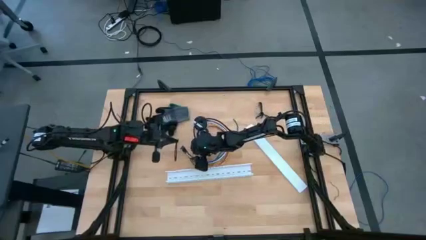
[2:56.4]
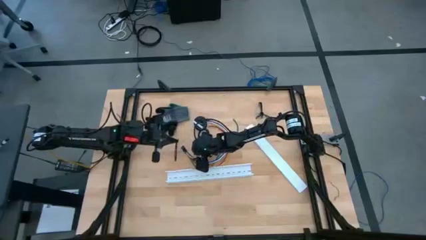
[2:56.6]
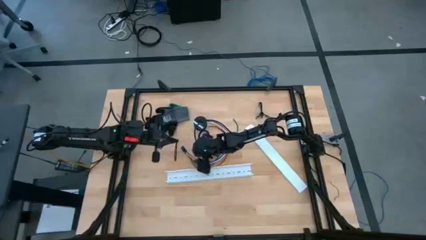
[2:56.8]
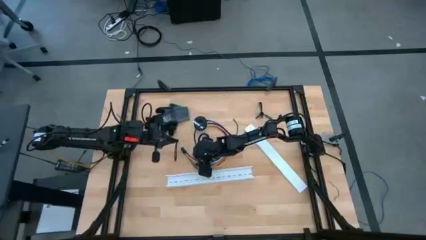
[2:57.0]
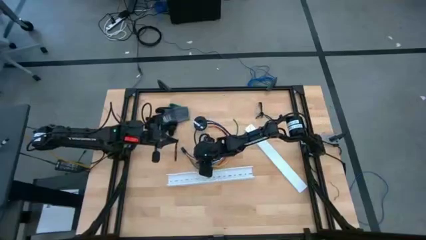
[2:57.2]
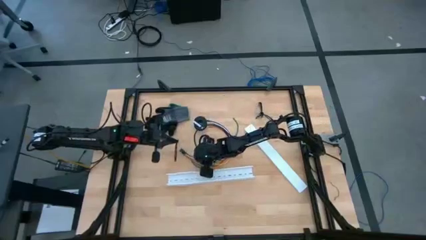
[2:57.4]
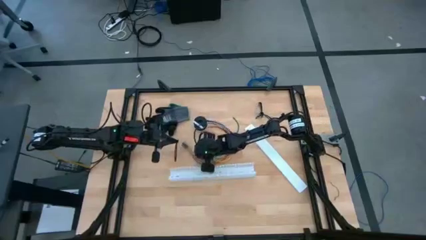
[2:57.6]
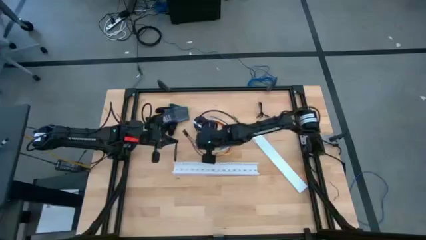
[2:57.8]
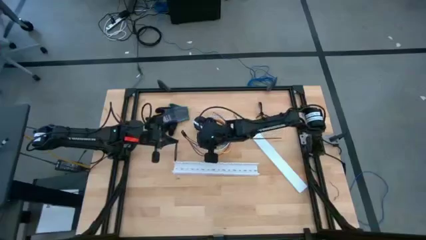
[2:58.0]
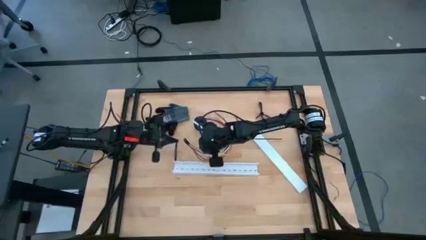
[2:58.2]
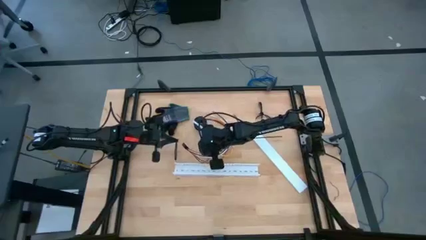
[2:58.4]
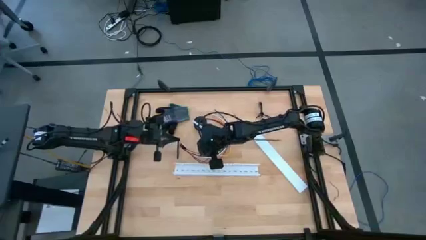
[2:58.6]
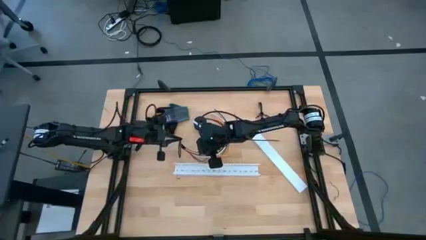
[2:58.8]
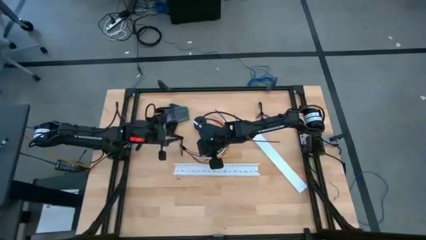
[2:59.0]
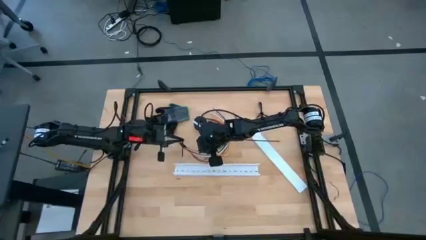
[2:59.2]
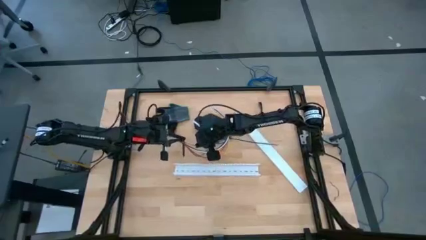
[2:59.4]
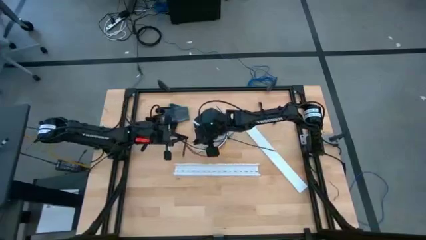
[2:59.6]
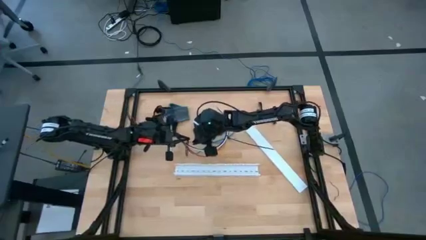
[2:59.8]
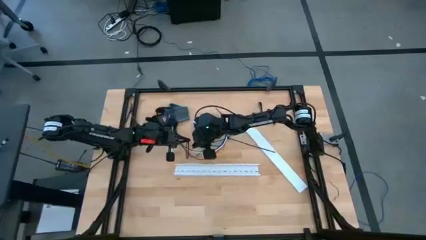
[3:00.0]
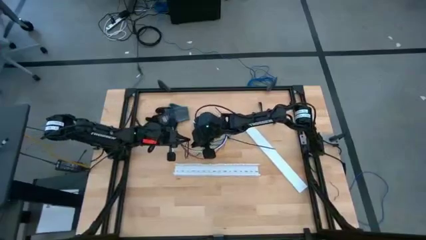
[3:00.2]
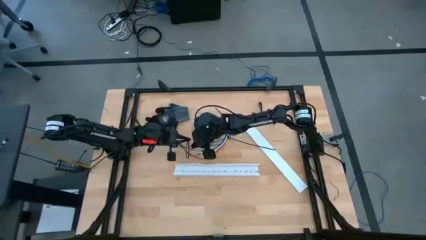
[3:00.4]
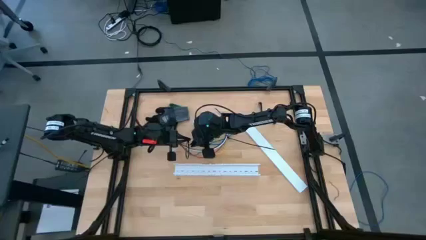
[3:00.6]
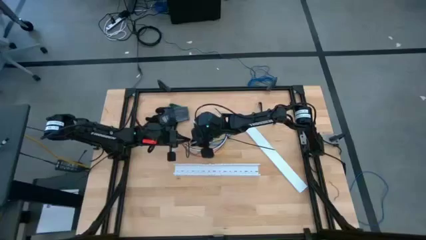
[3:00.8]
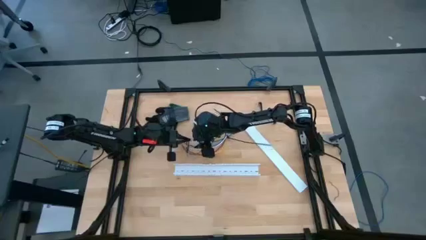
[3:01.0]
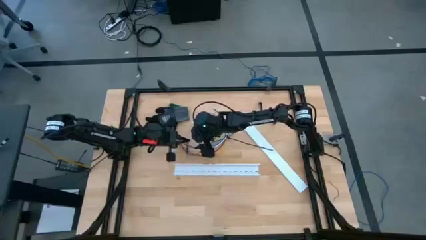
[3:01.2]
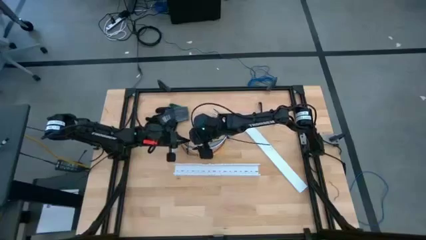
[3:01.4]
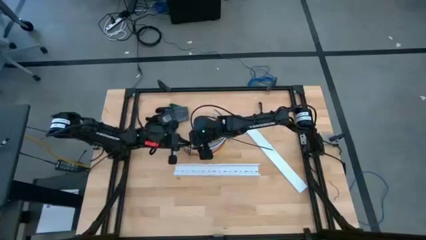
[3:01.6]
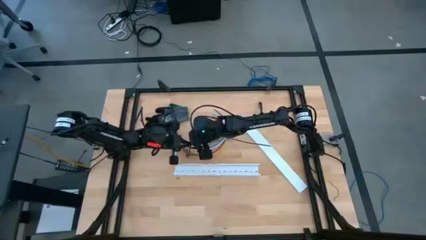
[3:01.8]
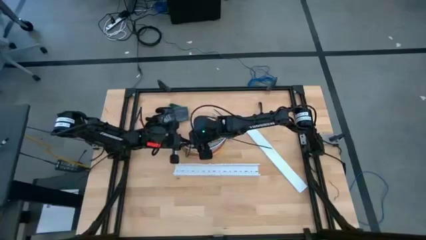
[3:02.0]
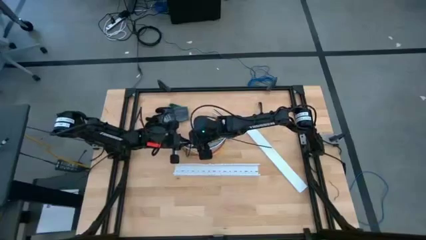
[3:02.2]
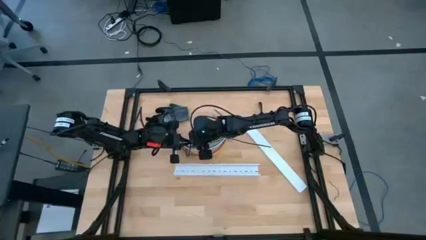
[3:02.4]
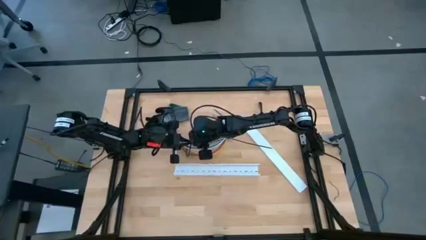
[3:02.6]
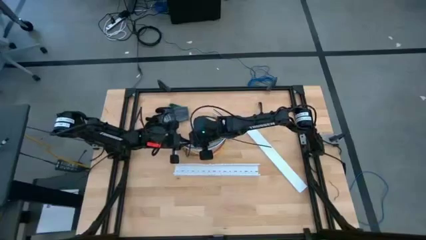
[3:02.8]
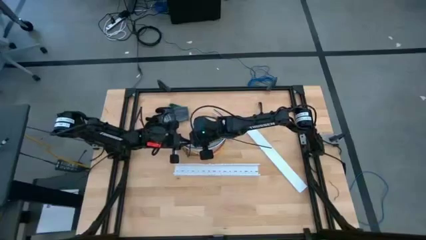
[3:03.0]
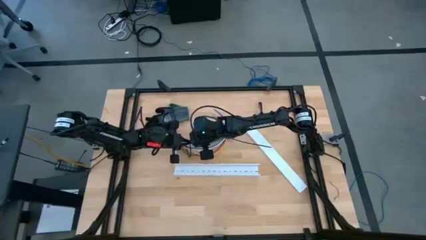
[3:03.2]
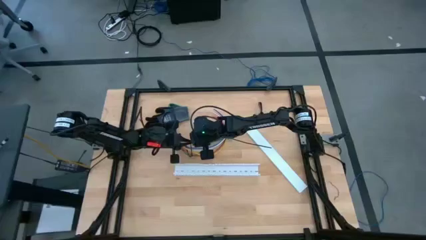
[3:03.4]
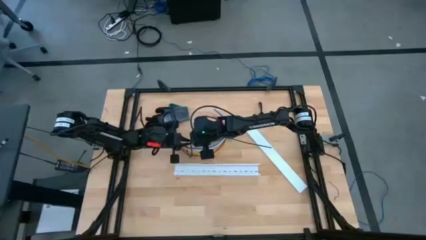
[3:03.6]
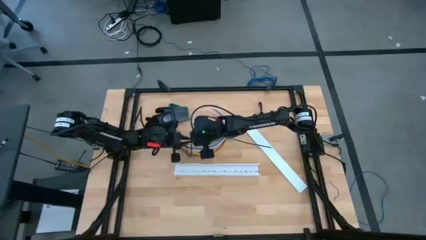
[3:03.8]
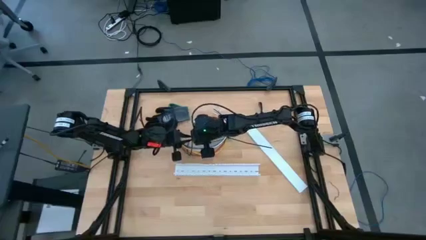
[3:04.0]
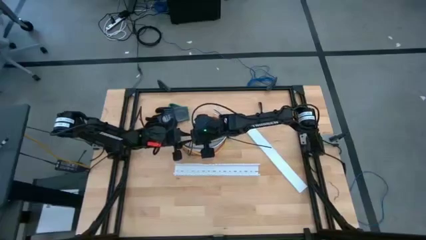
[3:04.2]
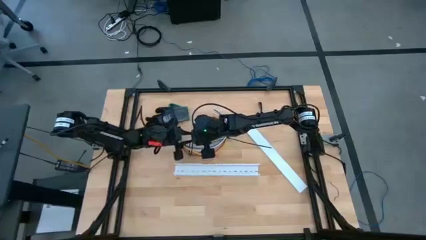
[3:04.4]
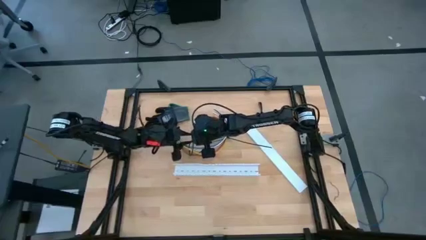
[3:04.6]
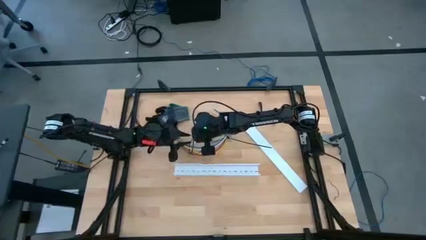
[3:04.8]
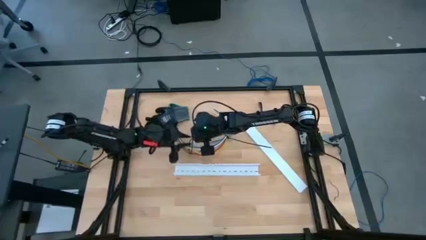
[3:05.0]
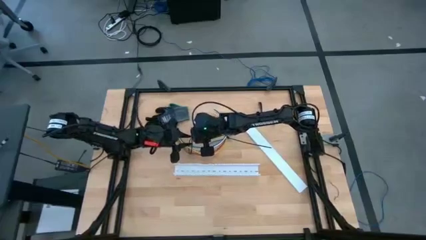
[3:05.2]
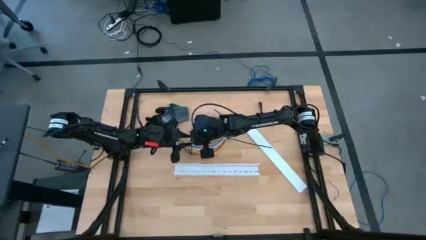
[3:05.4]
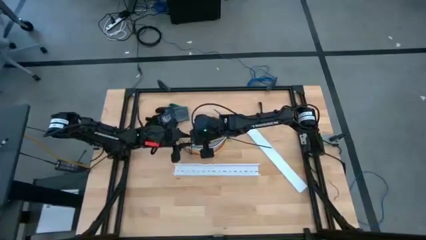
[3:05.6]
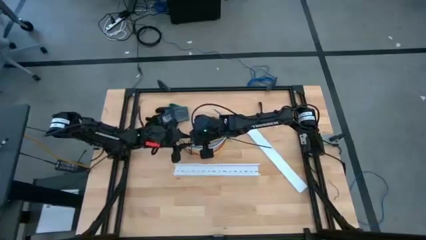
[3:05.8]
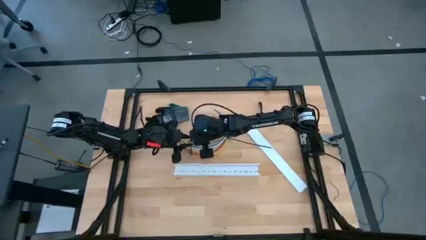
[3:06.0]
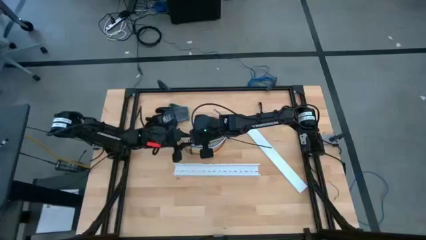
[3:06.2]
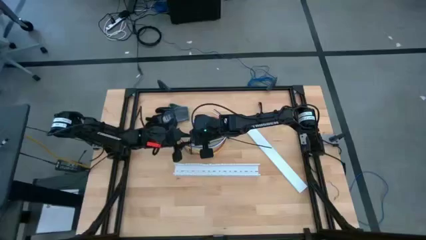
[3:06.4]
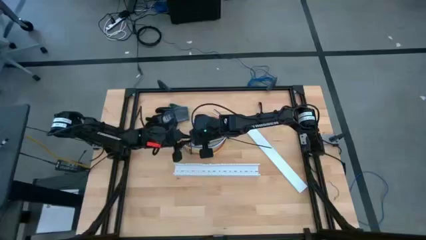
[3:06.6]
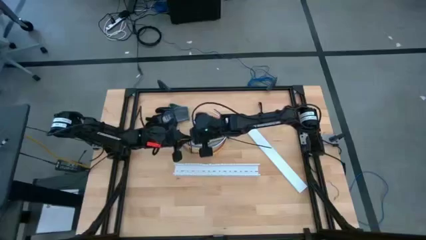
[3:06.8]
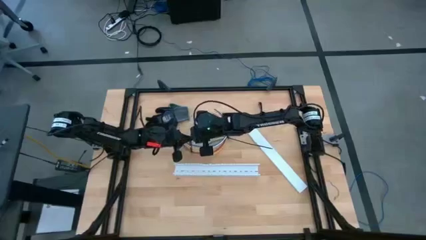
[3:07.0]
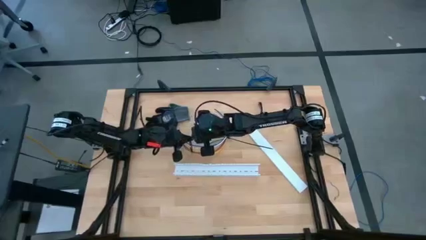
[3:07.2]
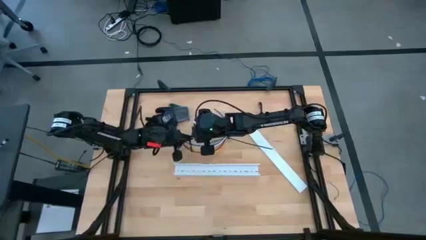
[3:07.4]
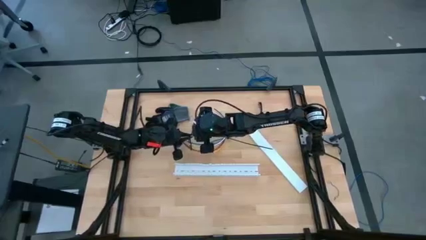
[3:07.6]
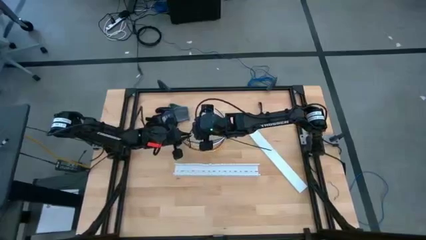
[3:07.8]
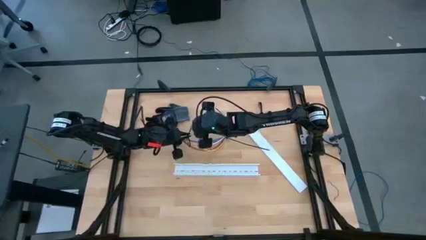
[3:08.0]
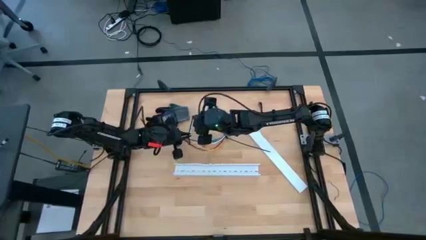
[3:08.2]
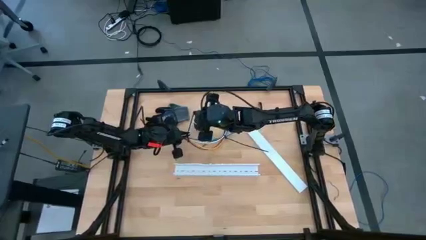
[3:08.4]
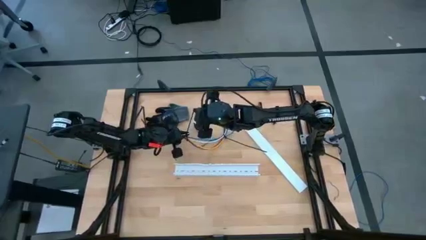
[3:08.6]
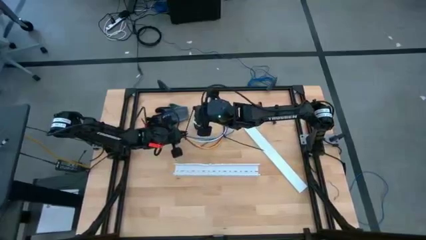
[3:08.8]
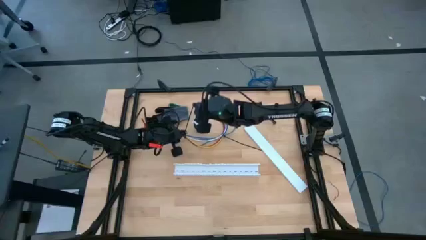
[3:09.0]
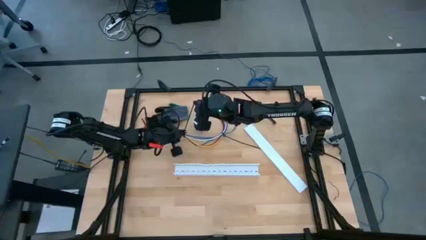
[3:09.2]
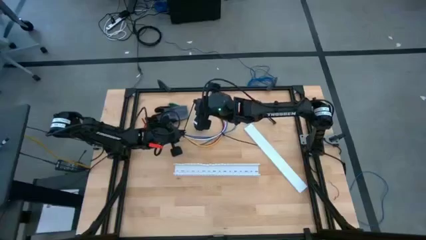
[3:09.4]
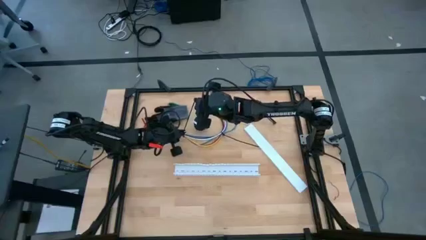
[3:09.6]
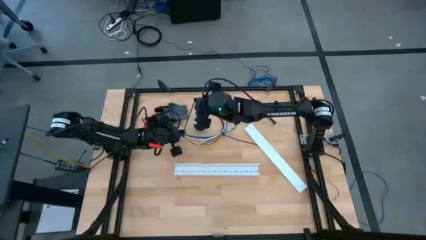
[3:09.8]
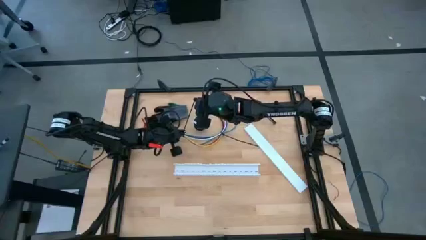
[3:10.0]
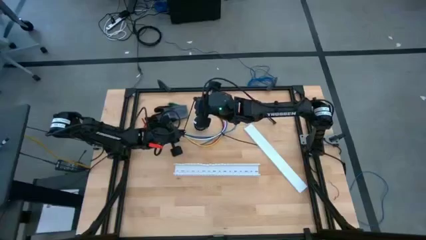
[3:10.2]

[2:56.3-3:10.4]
Task: Ziptie cables
Wrap the cable wires with the black zip tie
